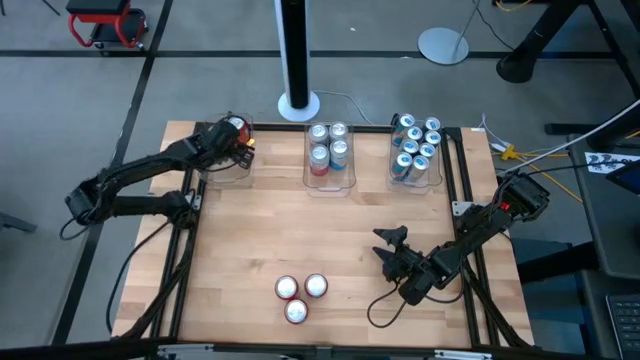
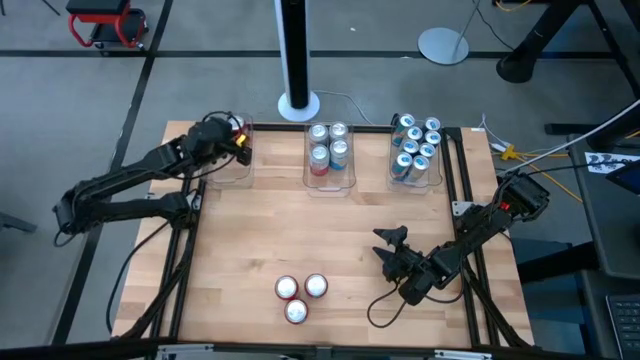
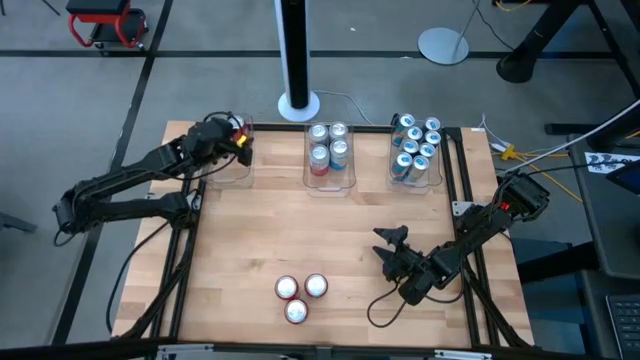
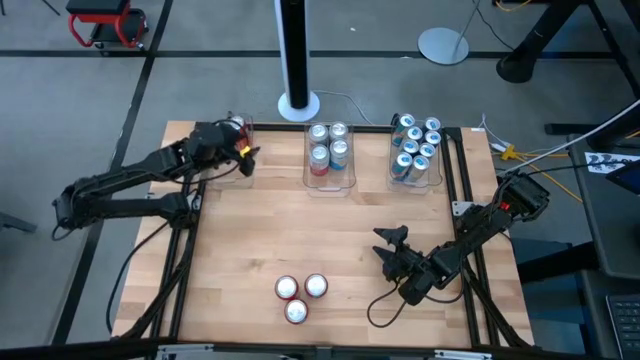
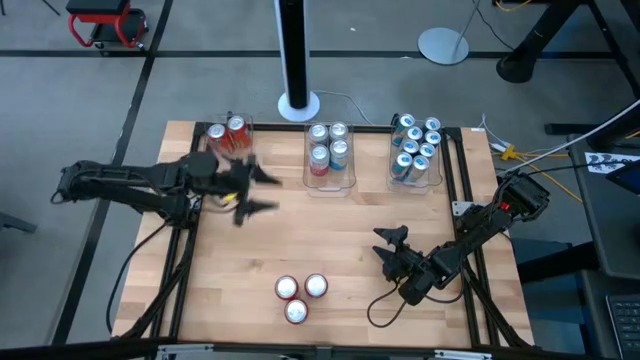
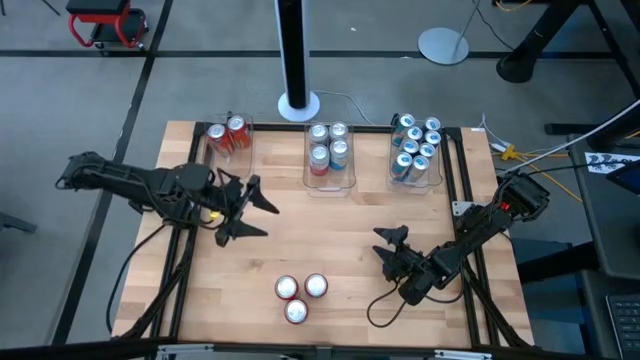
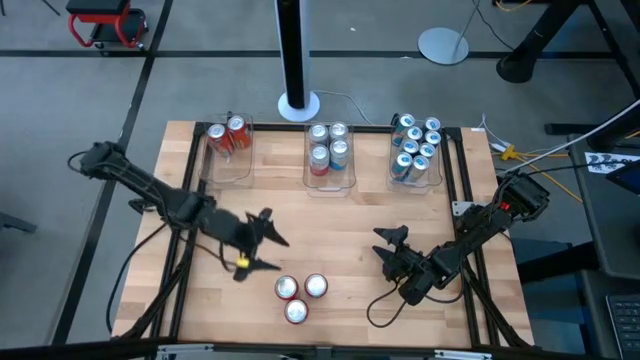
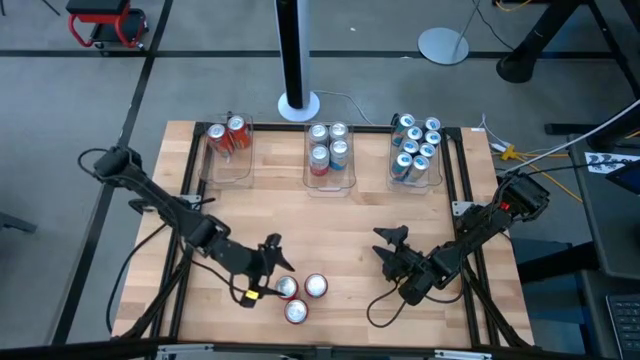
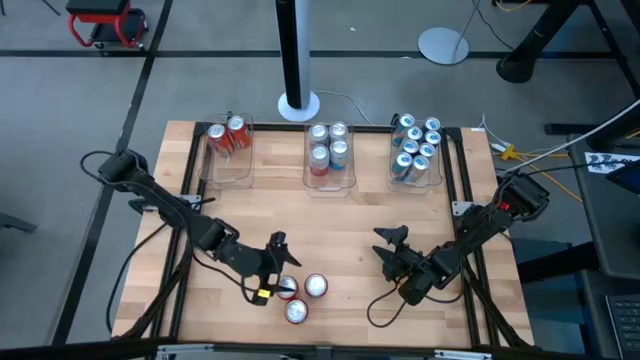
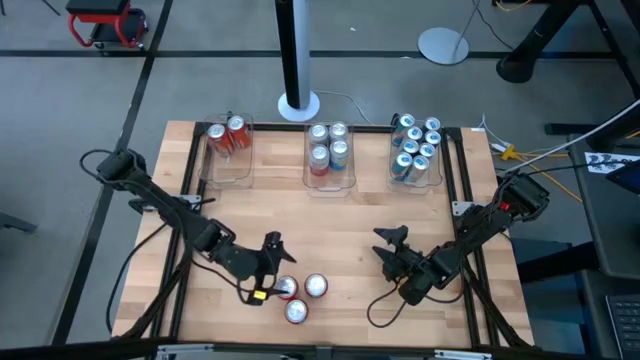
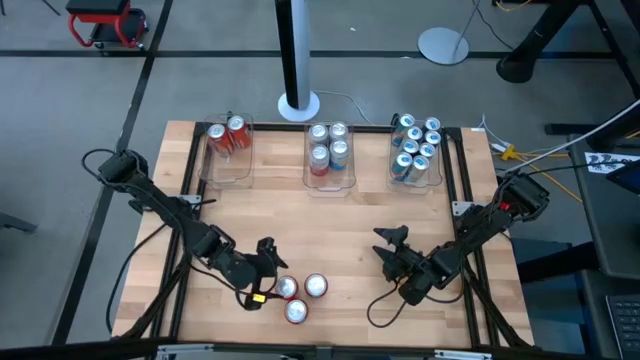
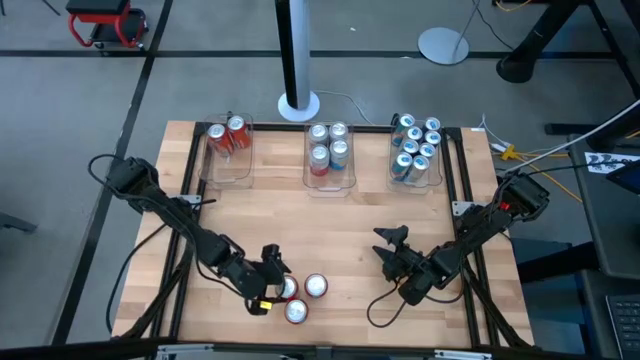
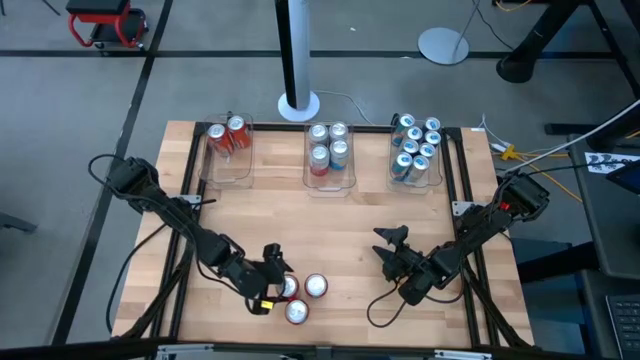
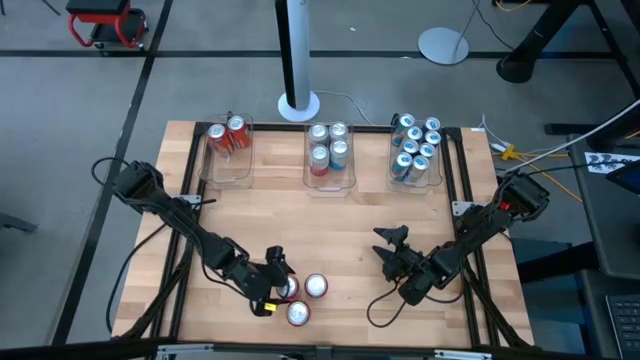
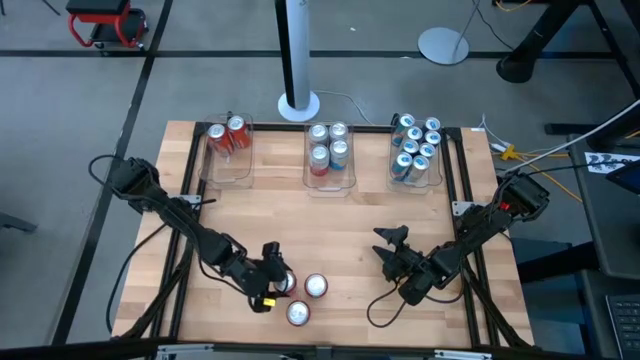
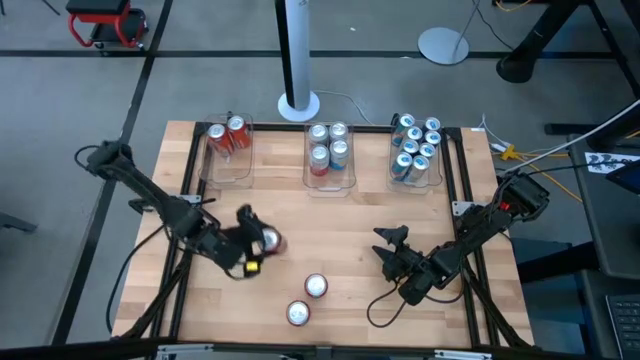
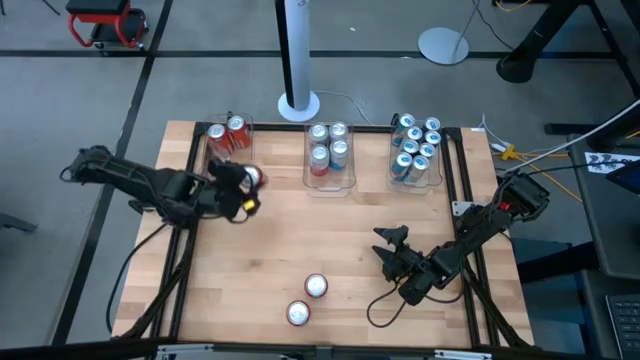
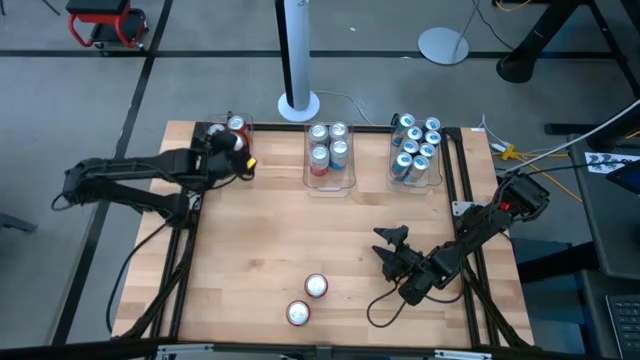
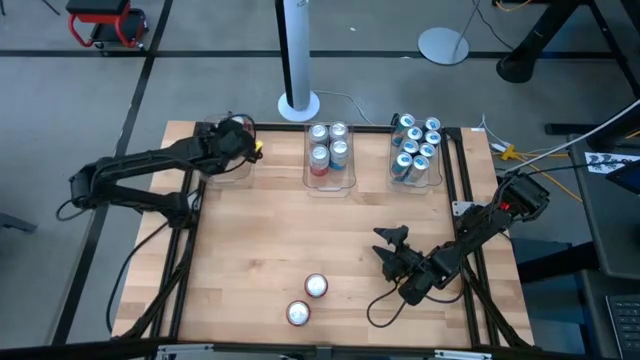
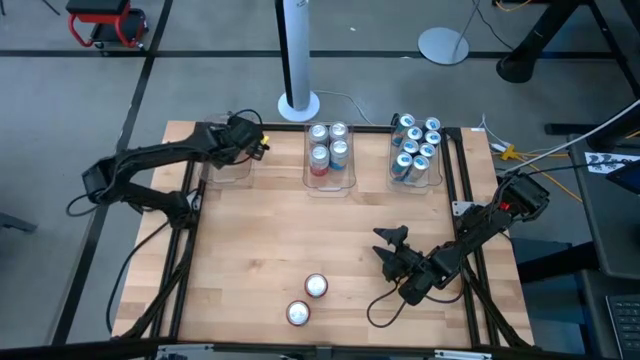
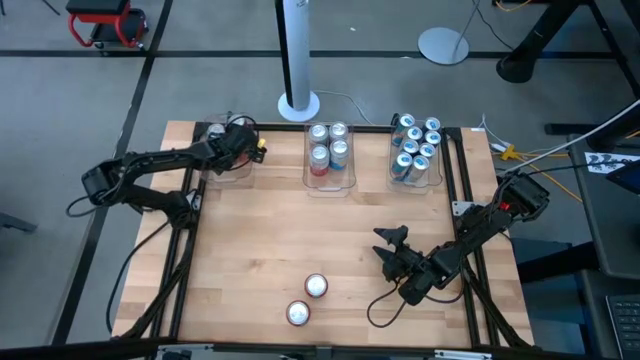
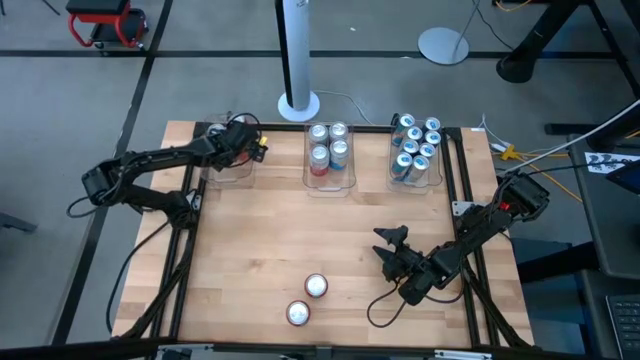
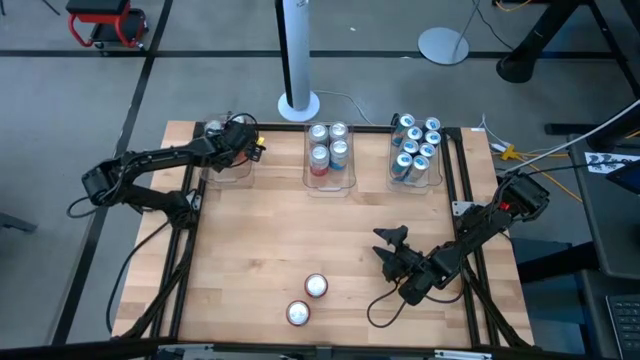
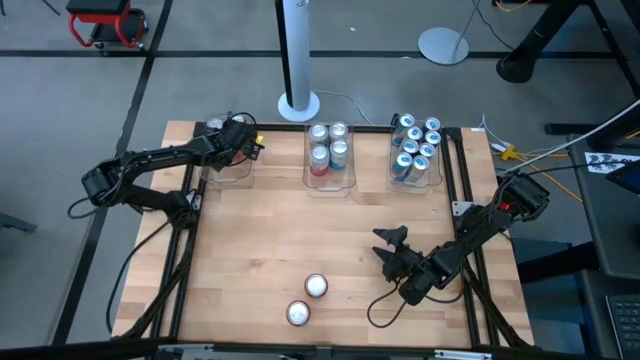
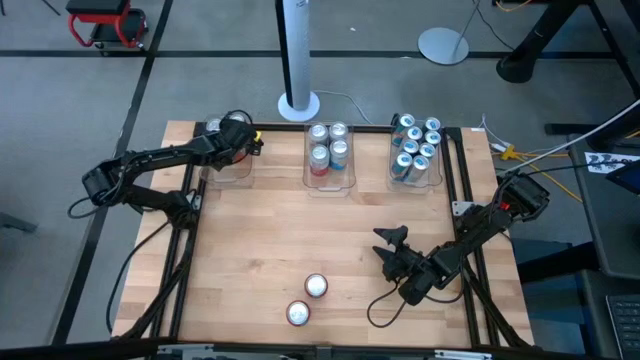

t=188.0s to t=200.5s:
Task: Sort soda cans
Put the red soda can into the top left transparent bin

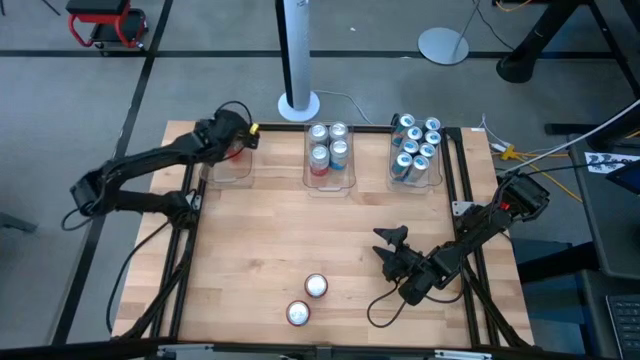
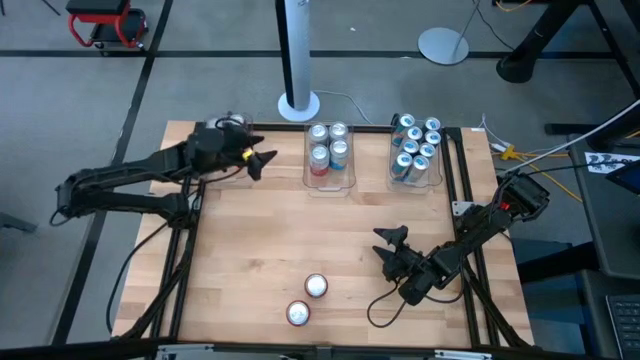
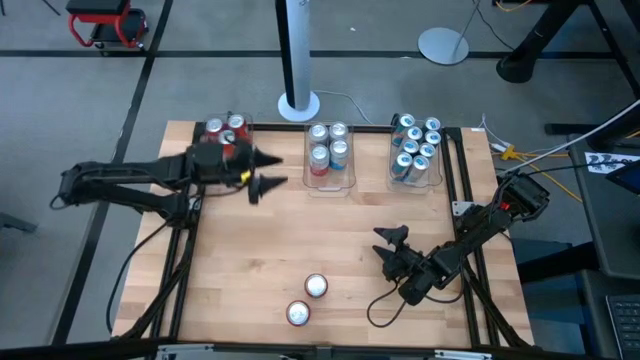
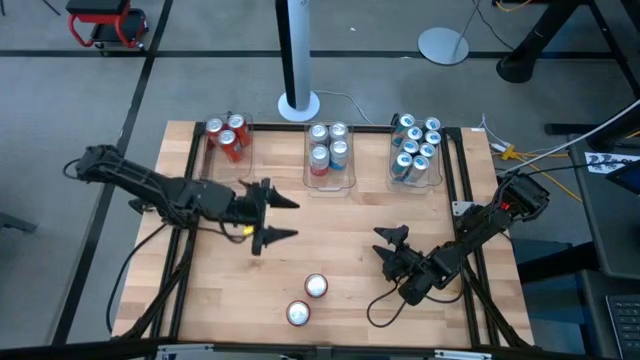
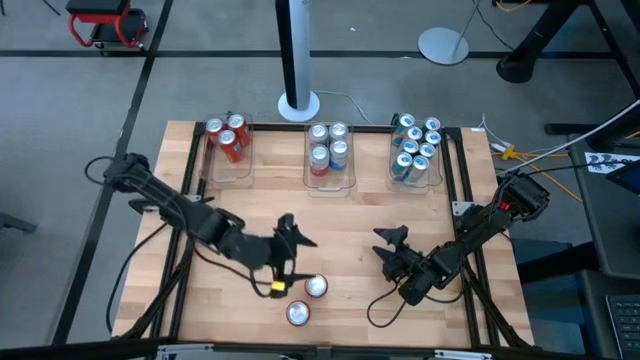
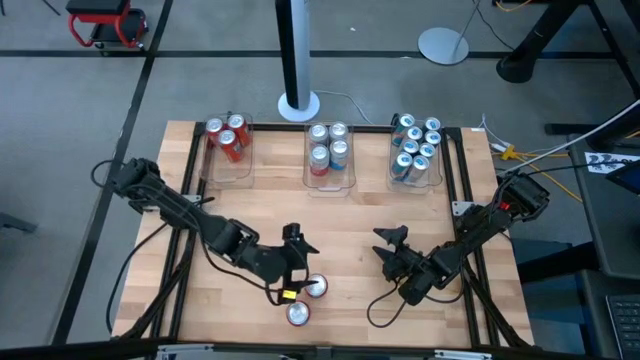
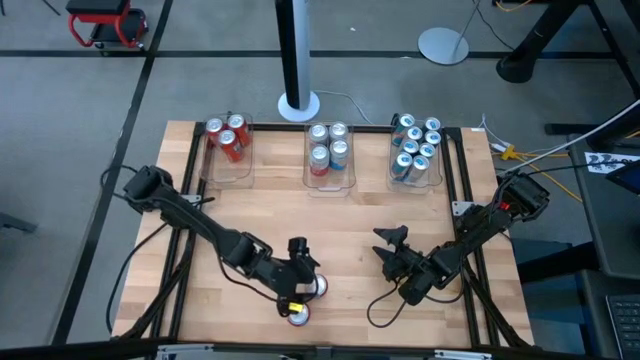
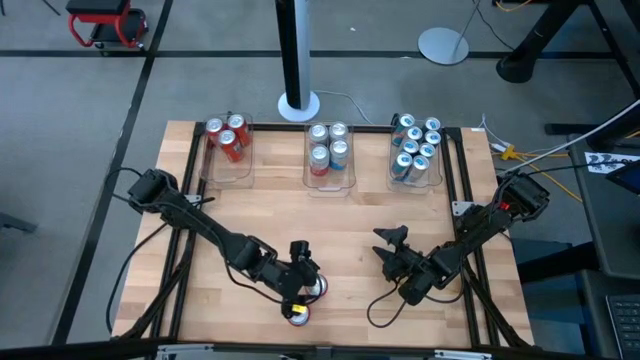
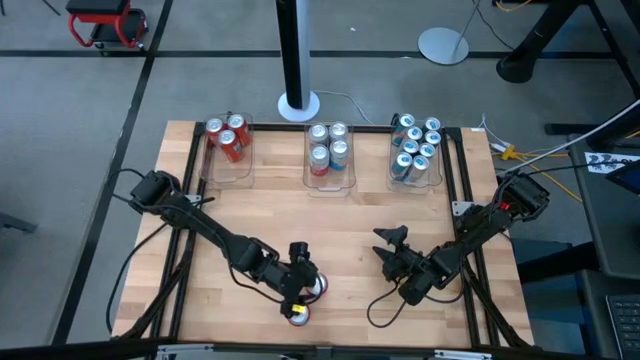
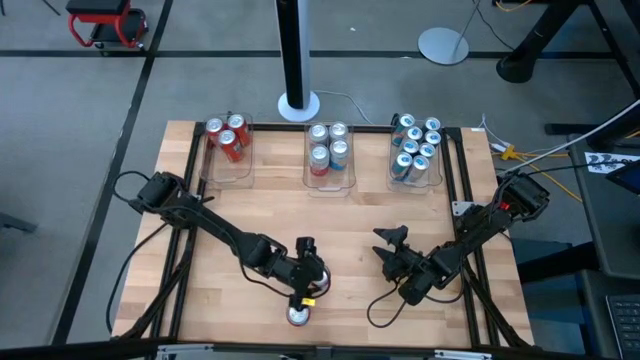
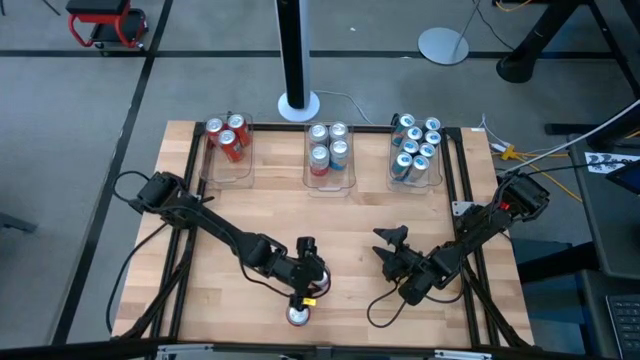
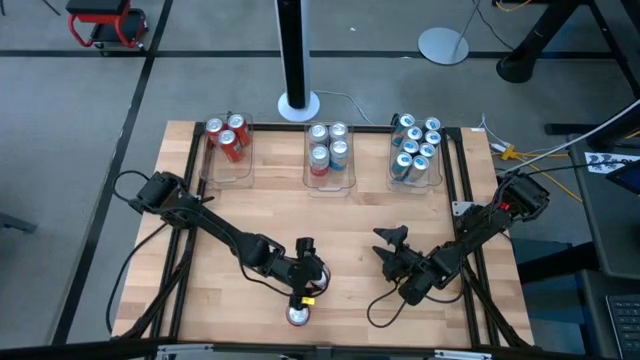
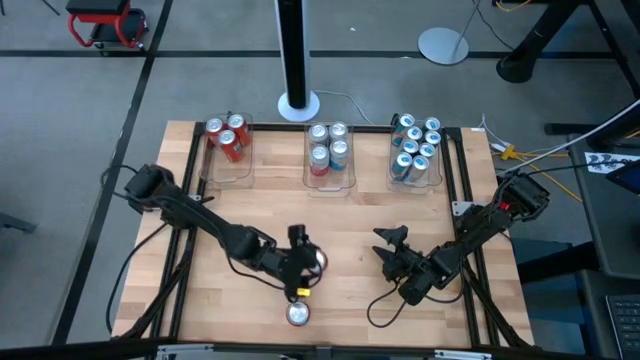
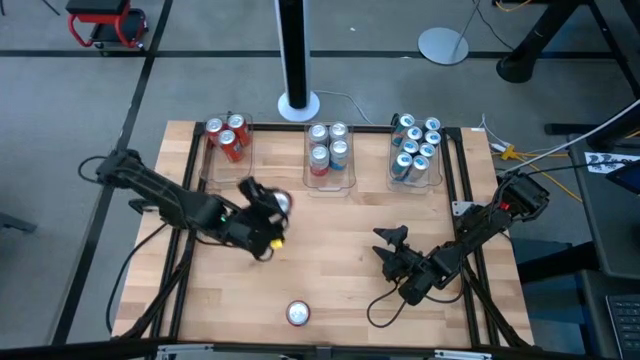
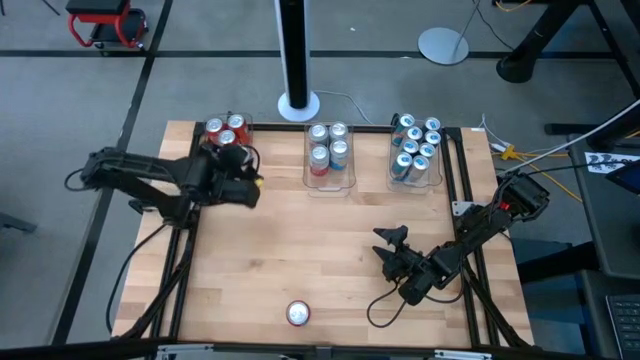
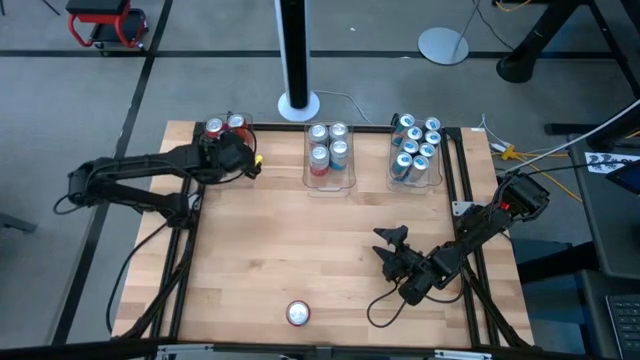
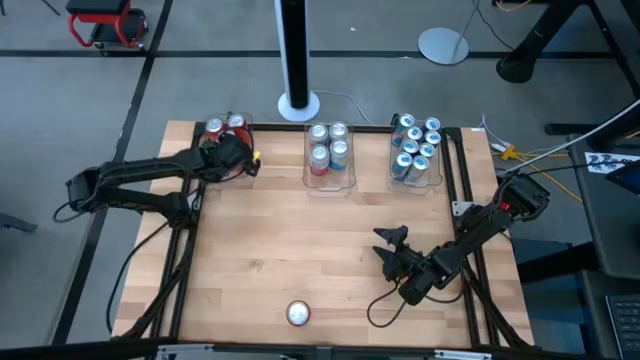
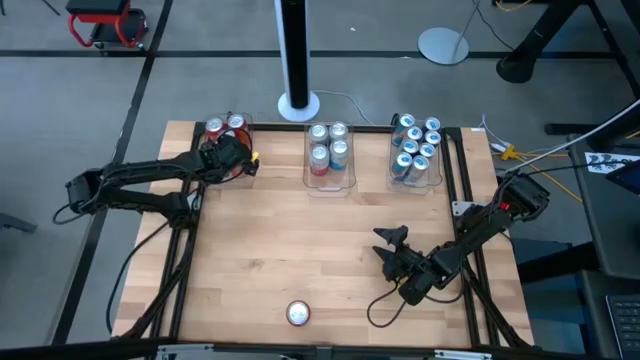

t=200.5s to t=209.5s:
Put the red soda can into the top left transparent bin

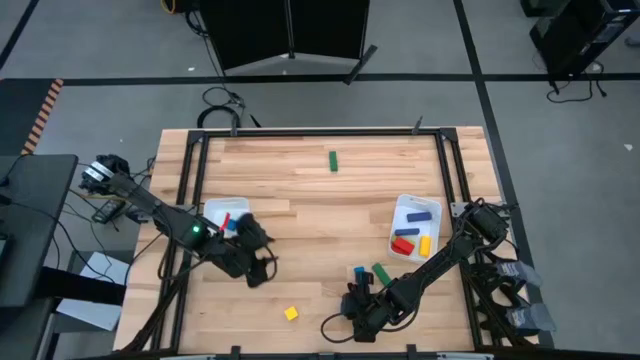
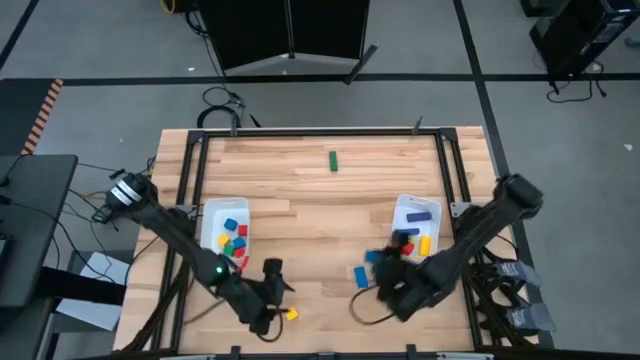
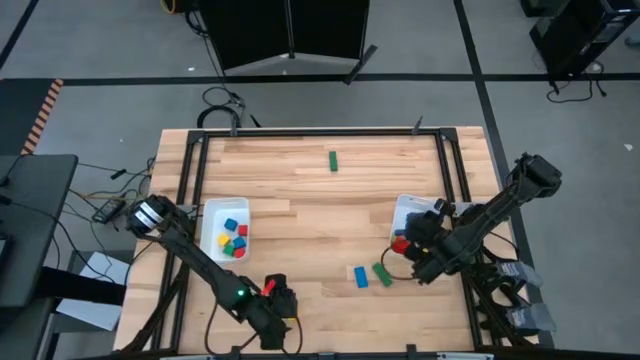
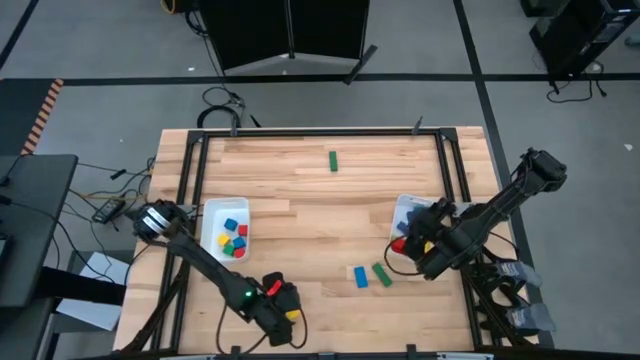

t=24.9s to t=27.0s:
Task: Sort blocks by size
Put the blue game piece into the right bin
